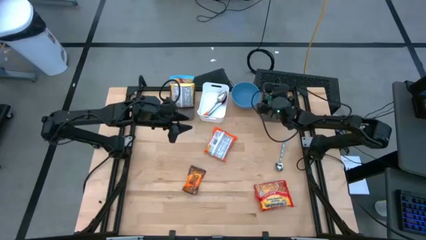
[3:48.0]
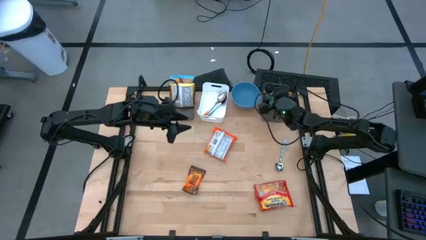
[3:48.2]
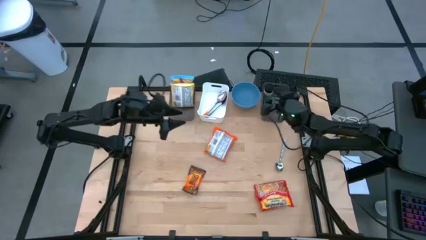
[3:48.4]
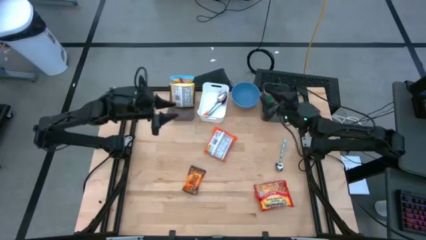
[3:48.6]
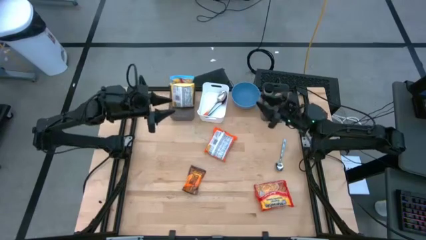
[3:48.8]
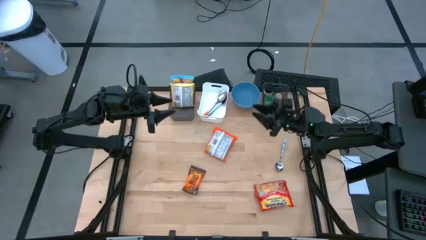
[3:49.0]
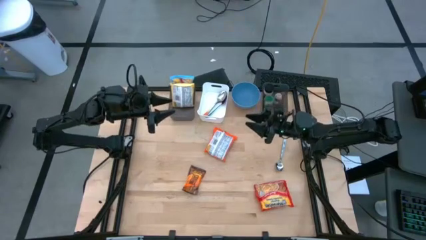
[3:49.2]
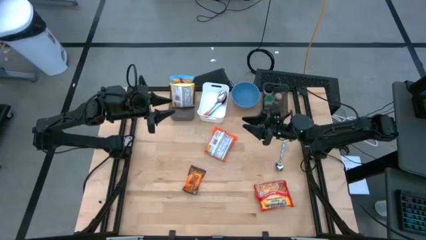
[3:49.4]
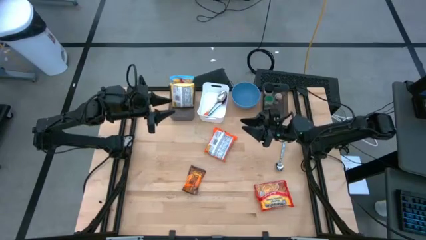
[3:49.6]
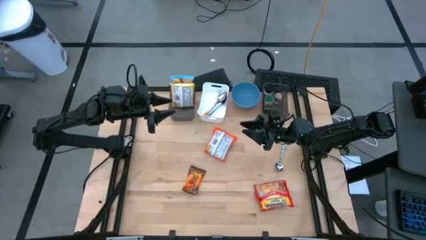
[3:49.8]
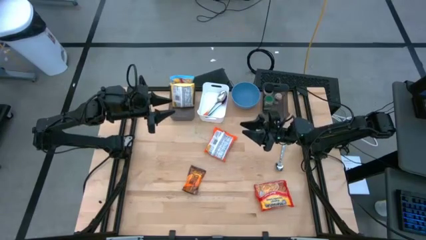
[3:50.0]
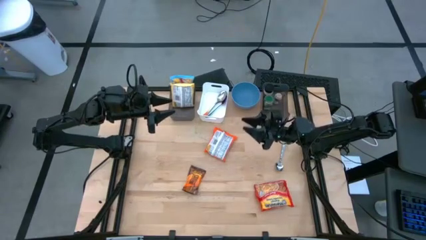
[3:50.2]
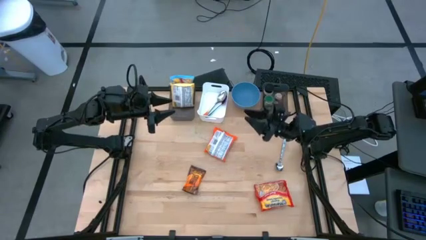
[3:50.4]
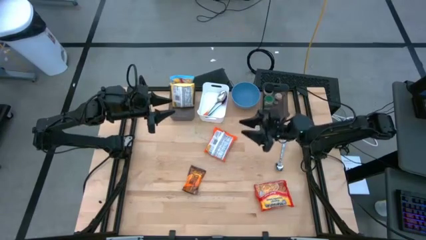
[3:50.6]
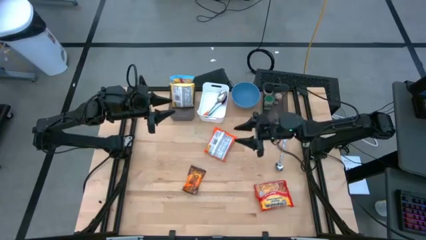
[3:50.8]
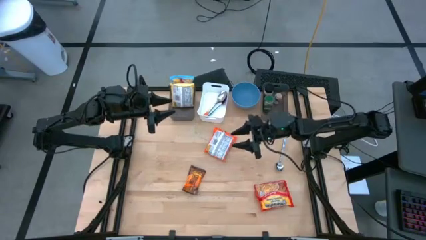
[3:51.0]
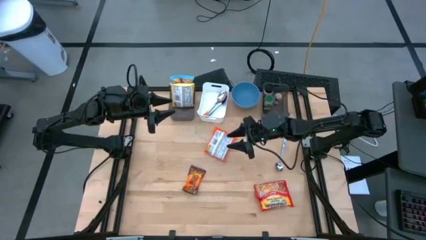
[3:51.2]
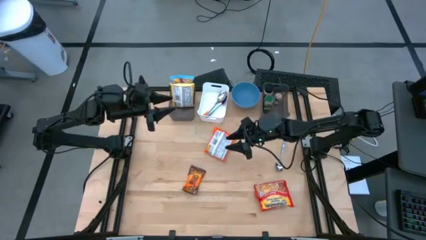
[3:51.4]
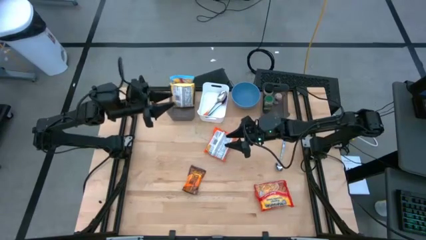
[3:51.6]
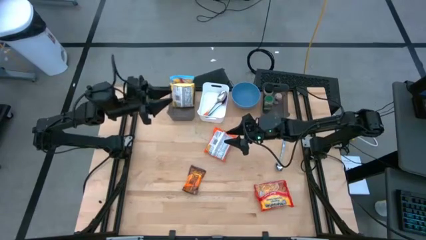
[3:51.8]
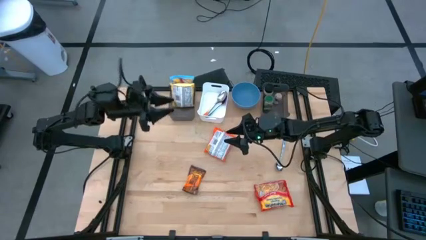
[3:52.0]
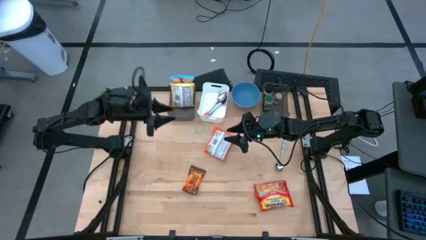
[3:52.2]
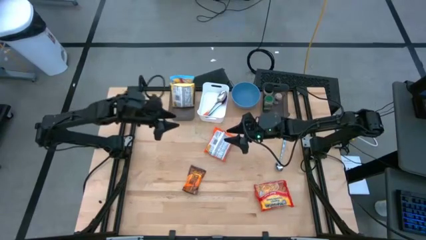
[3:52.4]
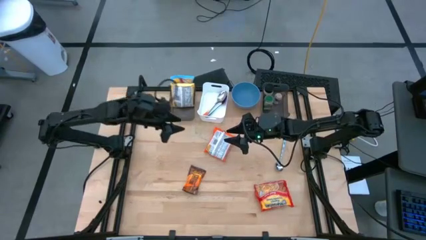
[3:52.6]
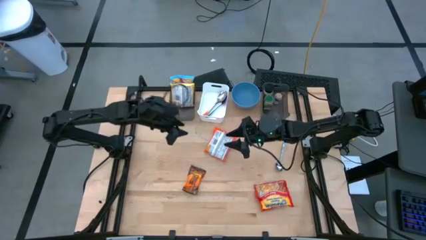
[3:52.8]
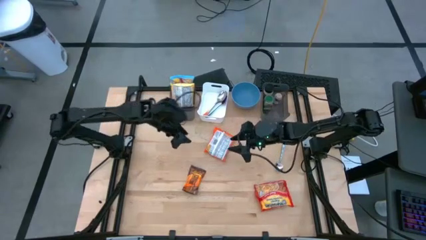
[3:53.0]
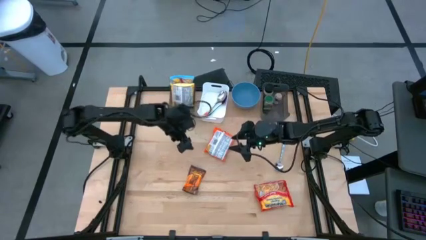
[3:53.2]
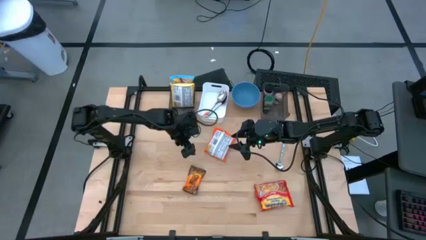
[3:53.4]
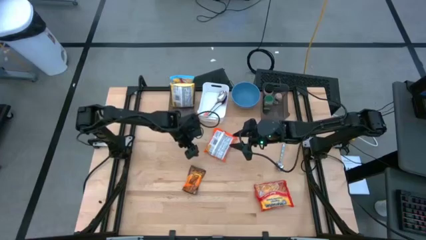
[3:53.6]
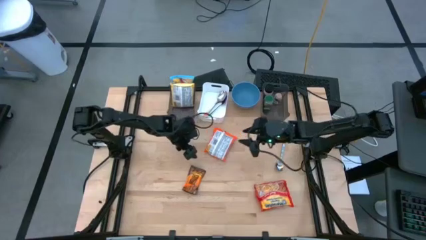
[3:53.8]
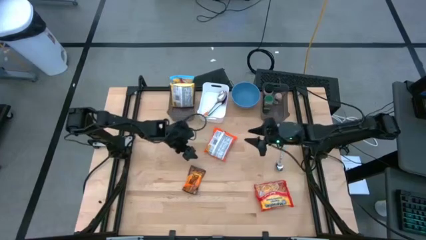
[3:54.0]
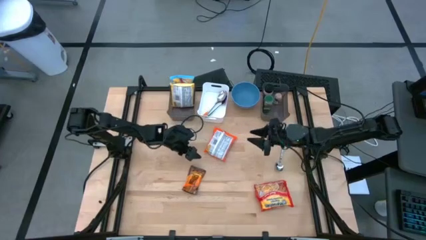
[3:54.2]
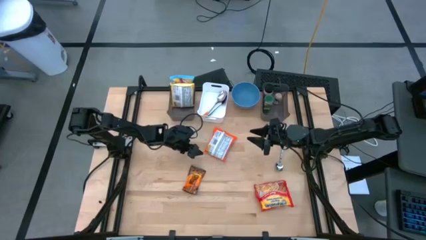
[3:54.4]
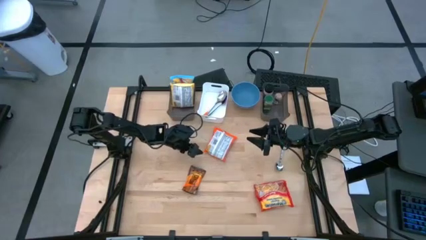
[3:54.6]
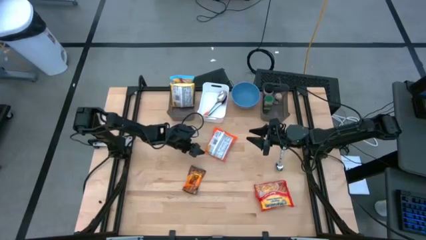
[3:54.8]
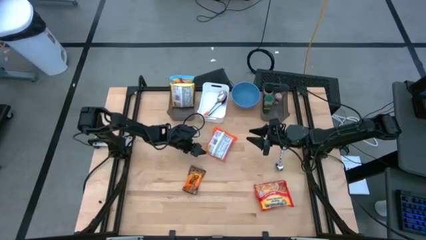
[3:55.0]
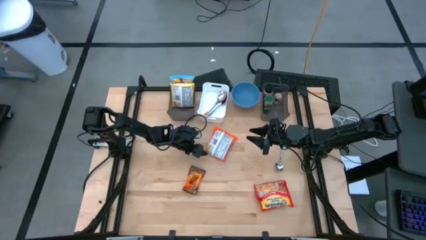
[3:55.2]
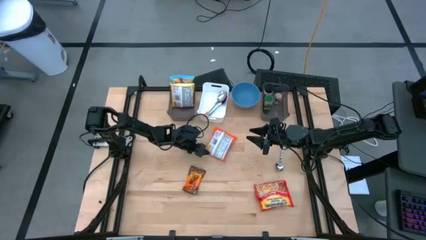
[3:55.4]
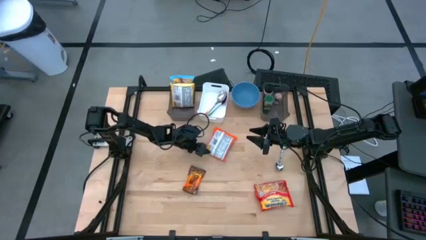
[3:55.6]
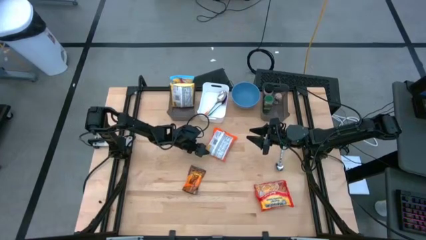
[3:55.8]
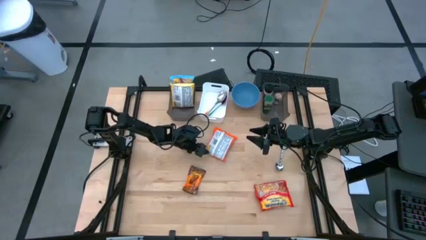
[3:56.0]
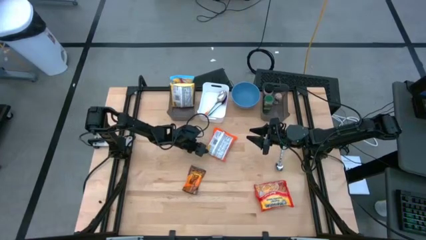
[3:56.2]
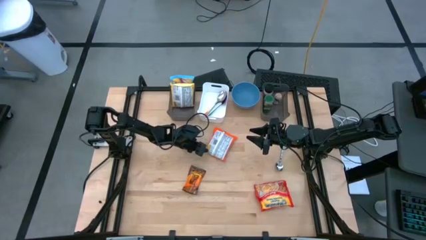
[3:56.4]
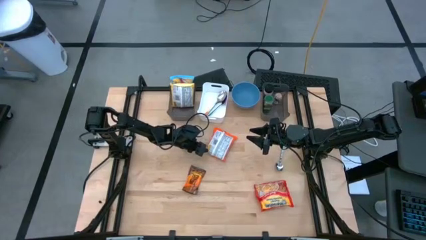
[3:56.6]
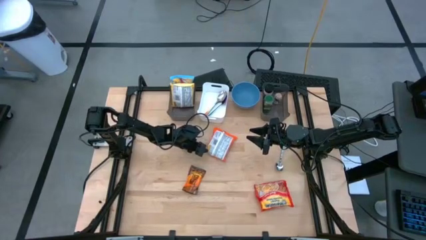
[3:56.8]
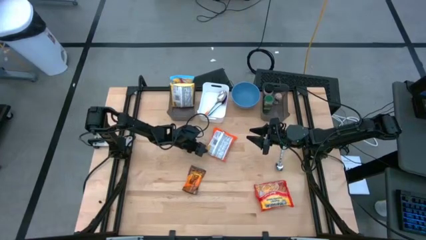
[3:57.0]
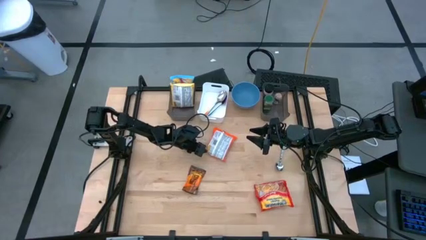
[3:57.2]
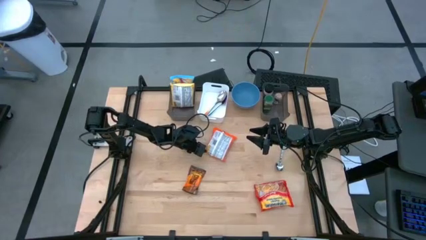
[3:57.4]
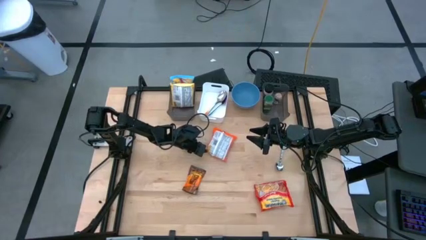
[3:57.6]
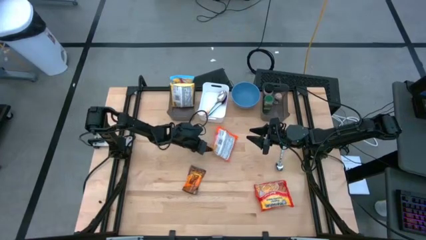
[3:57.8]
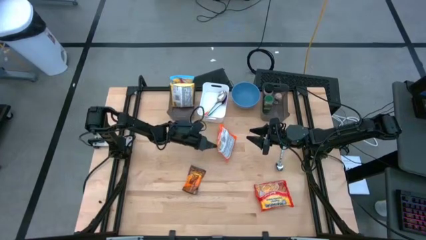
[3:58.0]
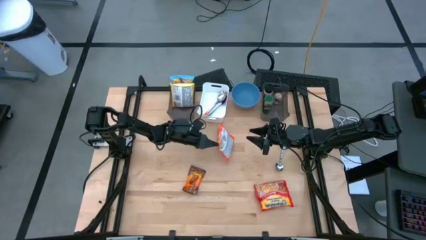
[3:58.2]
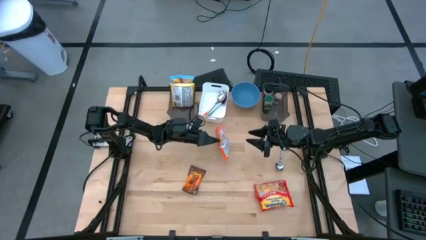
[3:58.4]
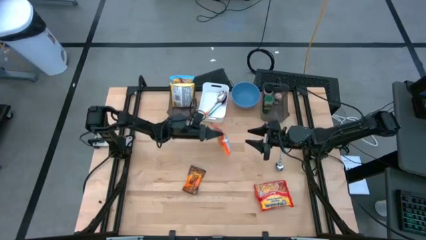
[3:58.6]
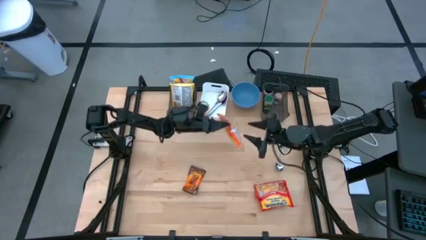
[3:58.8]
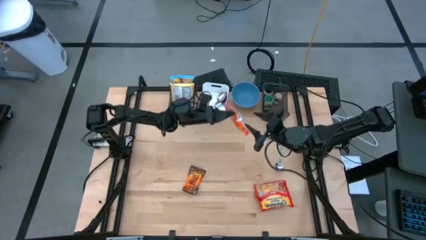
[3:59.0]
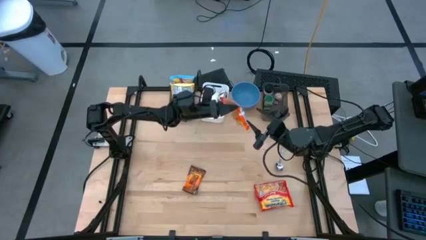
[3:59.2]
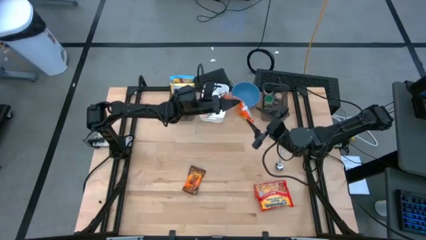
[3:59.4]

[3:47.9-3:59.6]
Task: Pick & Place Food Item
Put the orange noodle pack into the left black bin

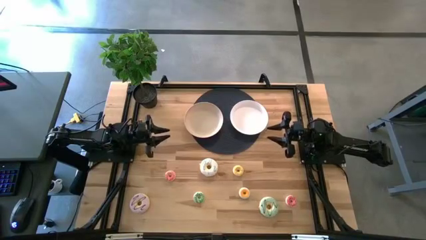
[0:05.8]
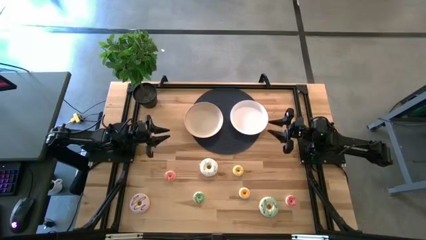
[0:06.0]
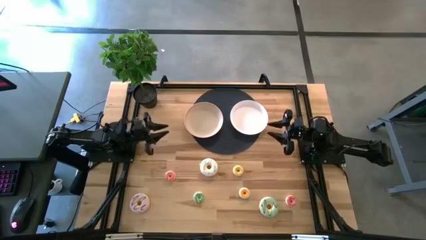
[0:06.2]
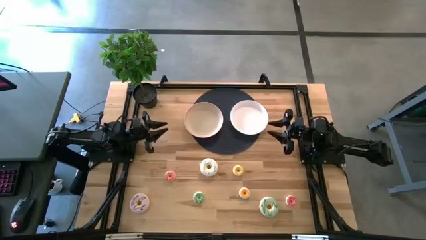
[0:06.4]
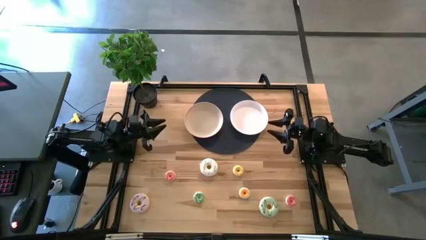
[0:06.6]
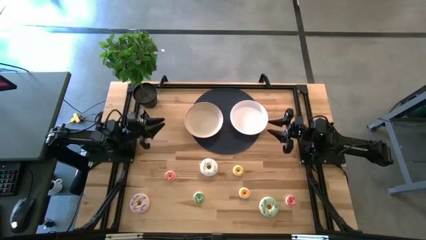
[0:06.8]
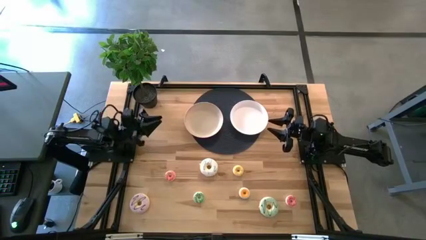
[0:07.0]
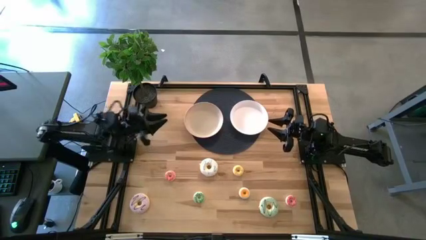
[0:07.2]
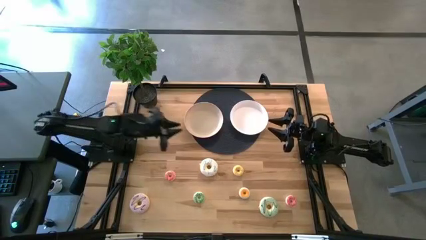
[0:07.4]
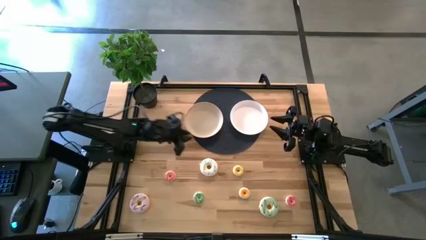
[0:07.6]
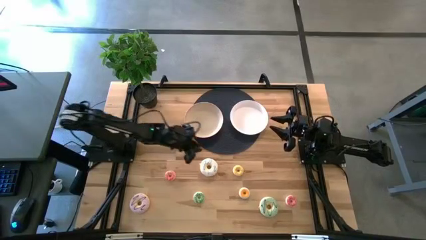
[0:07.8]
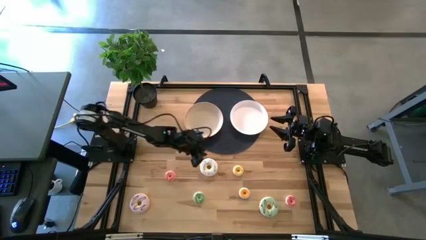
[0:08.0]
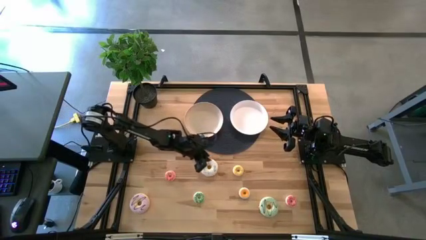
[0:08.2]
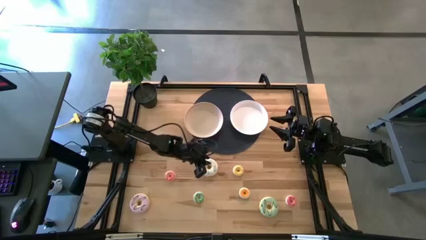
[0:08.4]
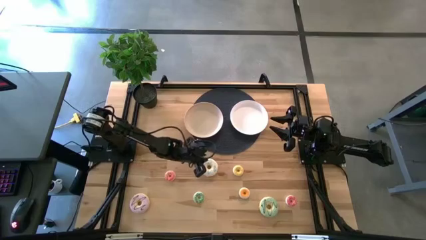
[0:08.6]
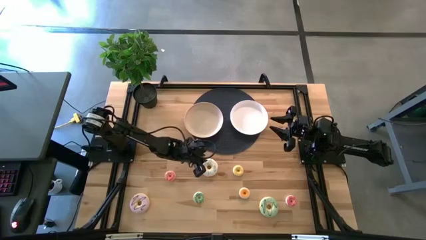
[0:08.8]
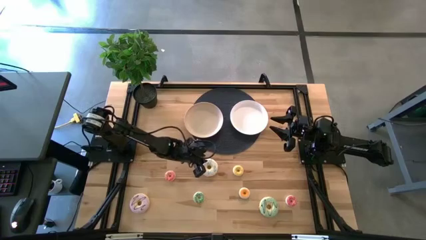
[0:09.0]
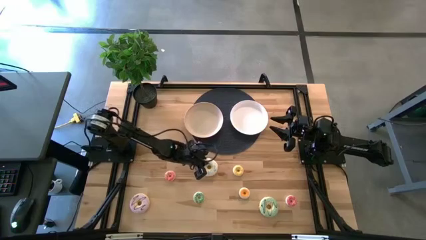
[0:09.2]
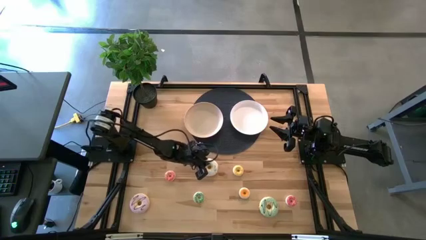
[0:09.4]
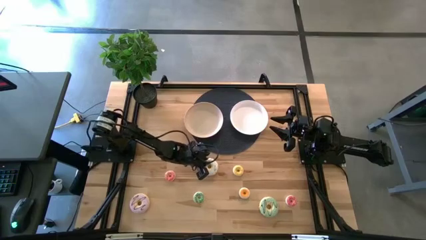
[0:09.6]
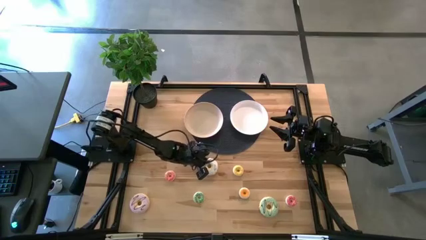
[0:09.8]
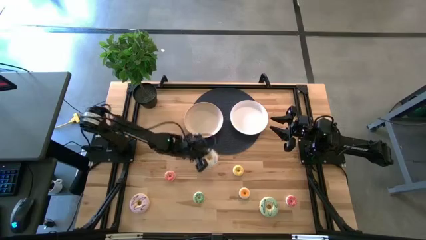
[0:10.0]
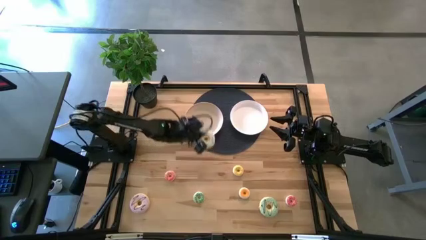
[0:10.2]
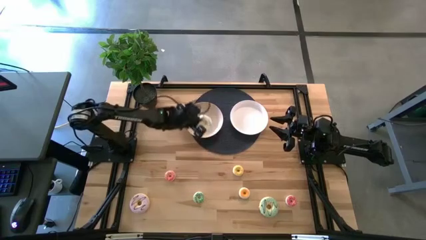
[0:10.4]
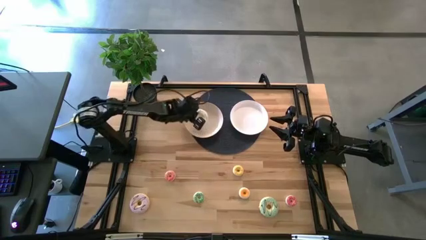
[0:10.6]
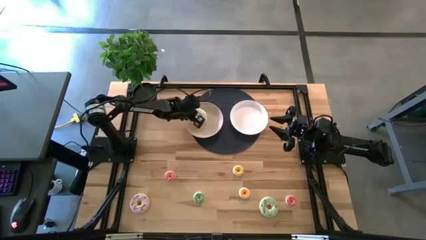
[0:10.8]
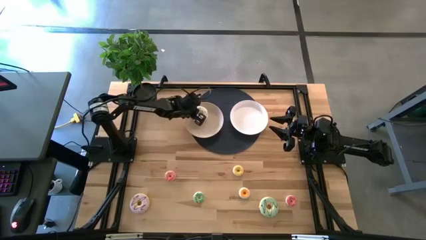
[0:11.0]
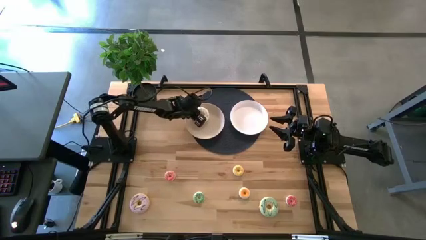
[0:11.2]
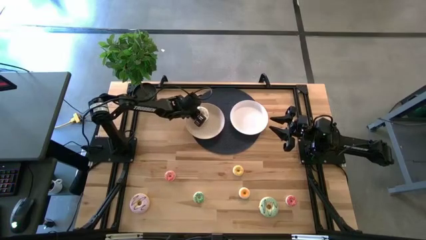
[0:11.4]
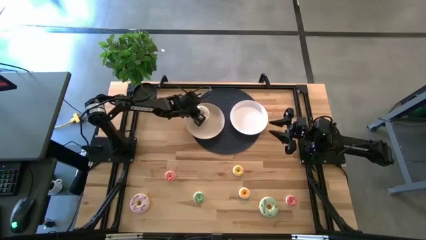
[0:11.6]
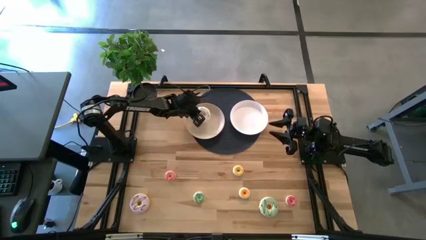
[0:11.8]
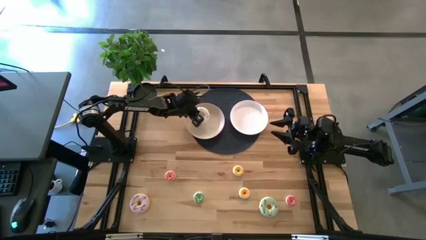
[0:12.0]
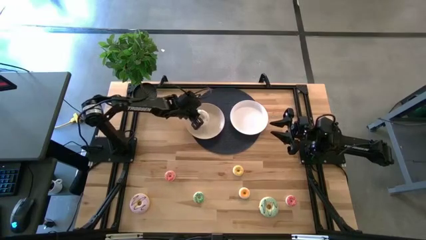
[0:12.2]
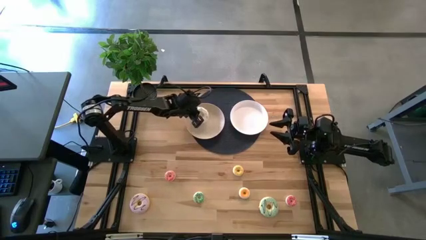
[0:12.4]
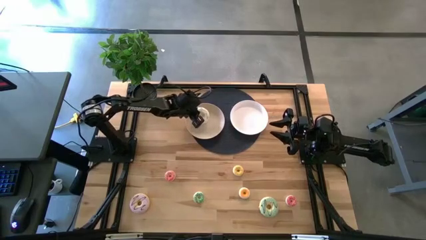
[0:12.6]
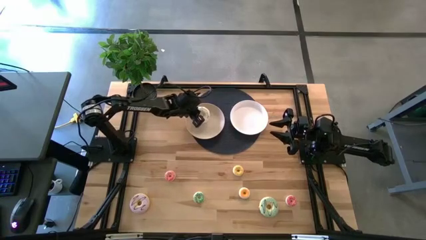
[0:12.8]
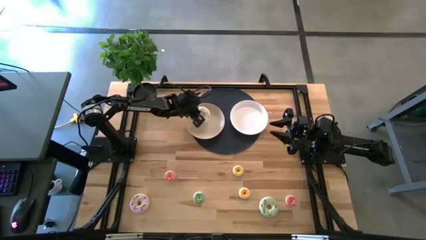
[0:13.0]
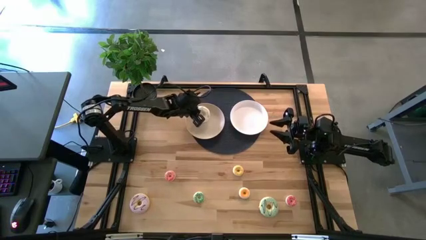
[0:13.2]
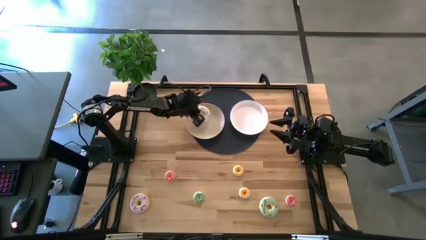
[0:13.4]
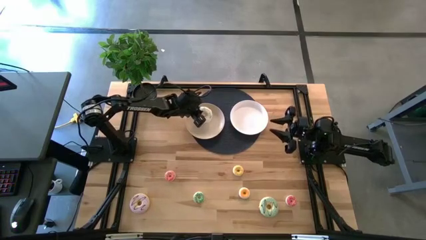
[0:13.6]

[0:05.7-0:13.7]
Task: Pick & Place donuts
Put the large white donut on the left white plate
